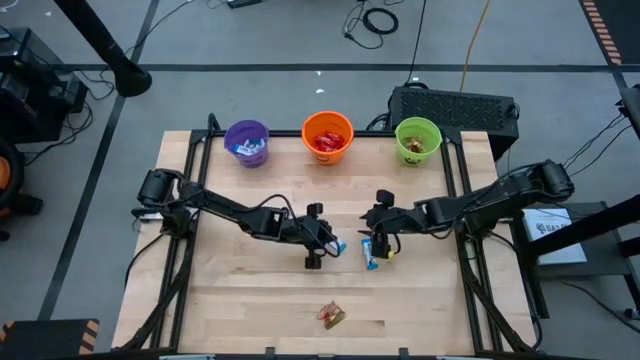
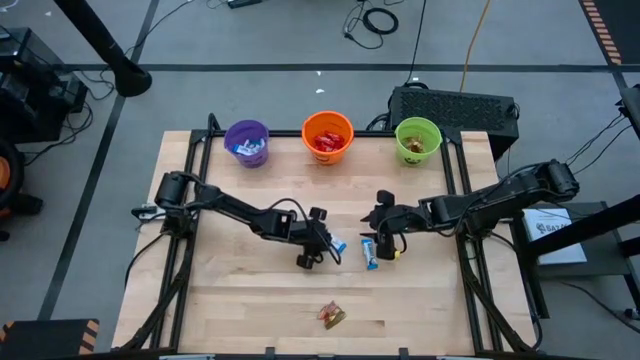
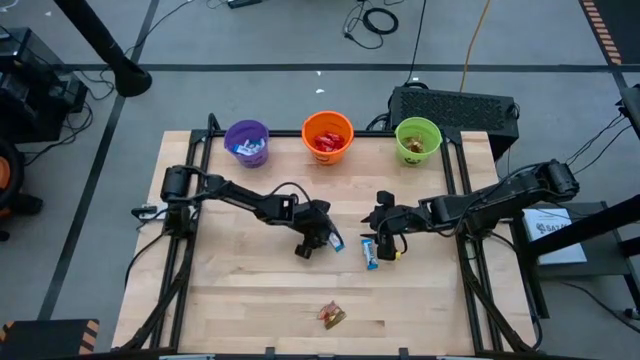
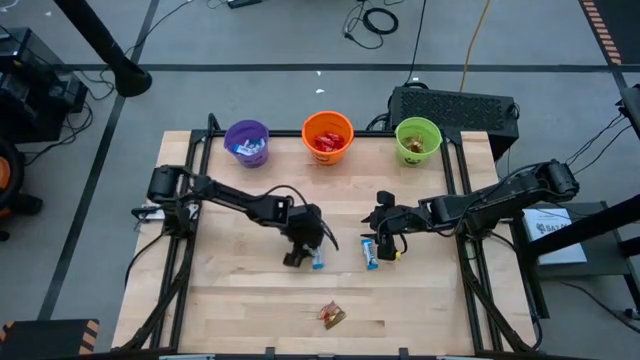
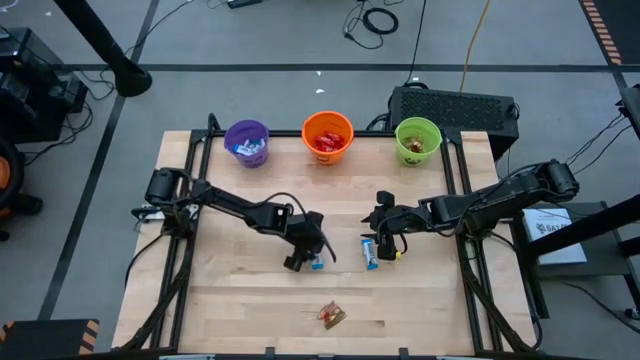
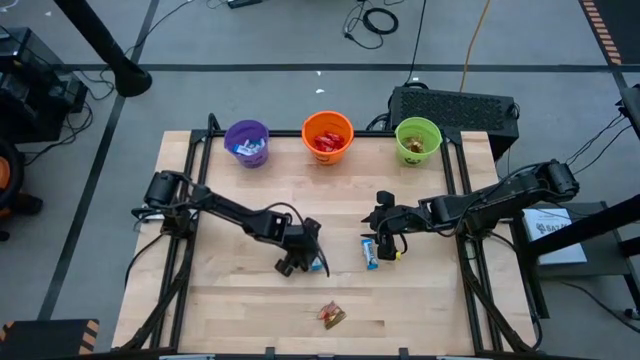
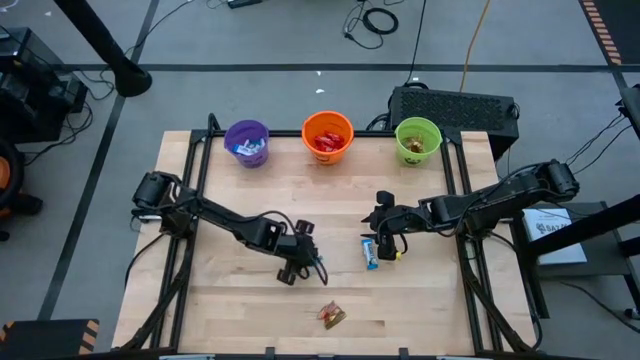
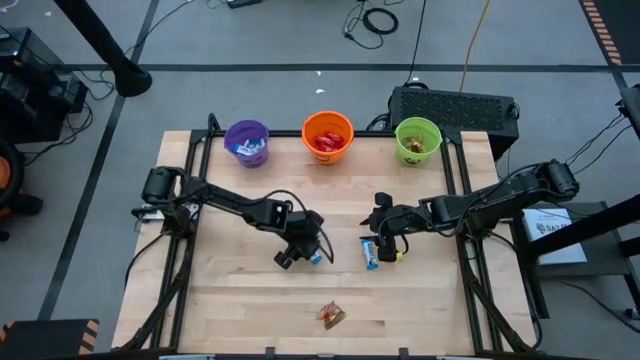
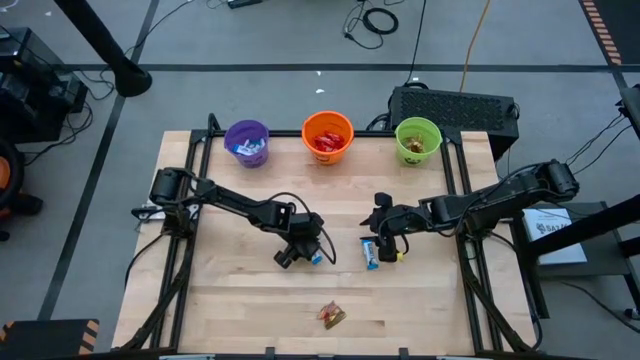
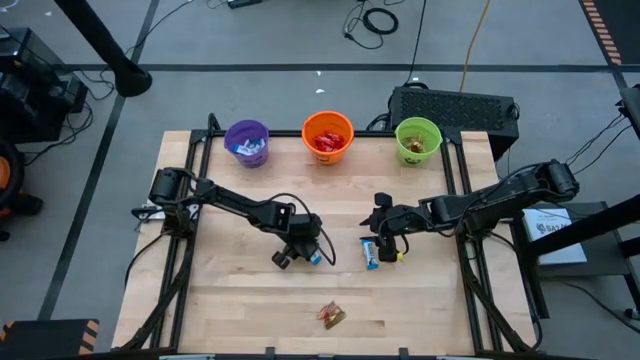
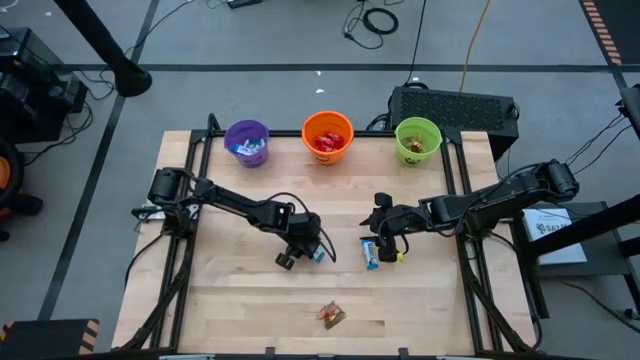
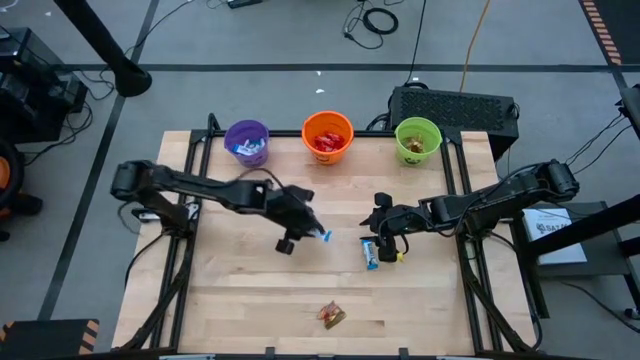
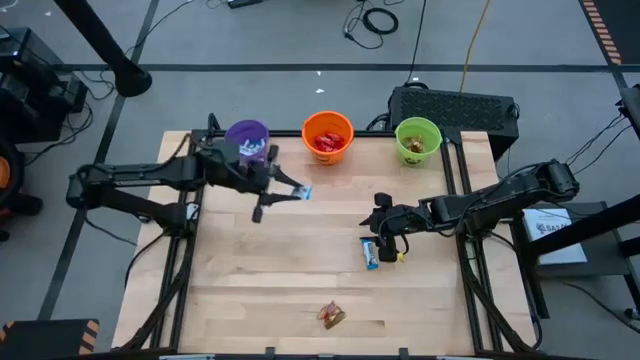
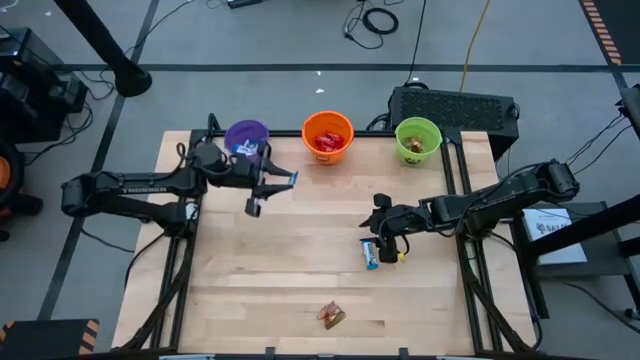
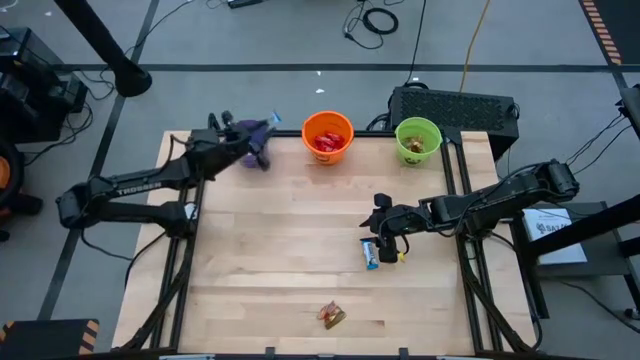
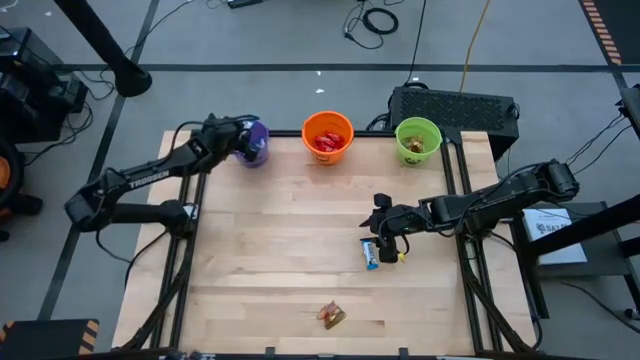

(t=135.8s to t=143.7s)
Task: Sort candy by brand, put in halloween buckets
Put the white chocolate into the purple bucket

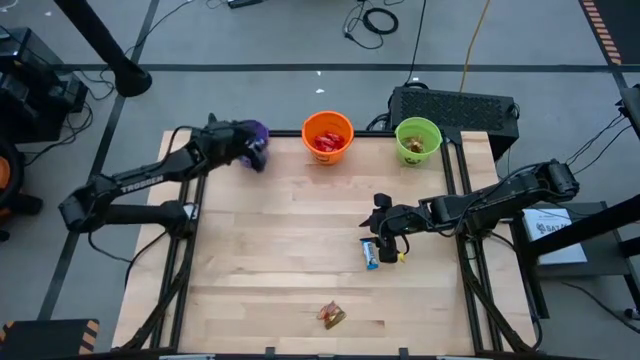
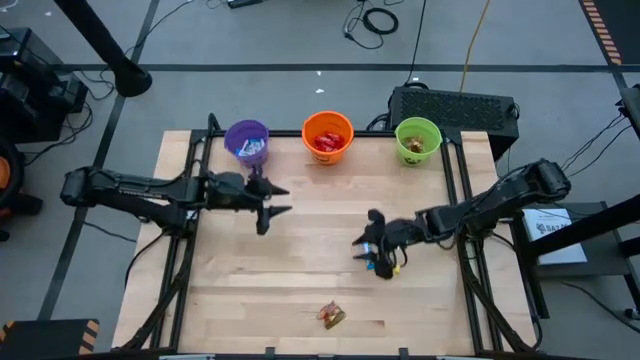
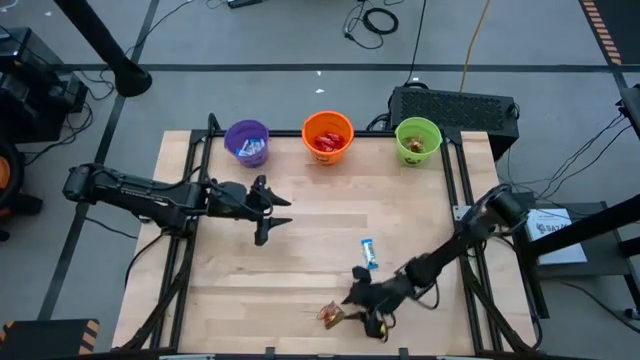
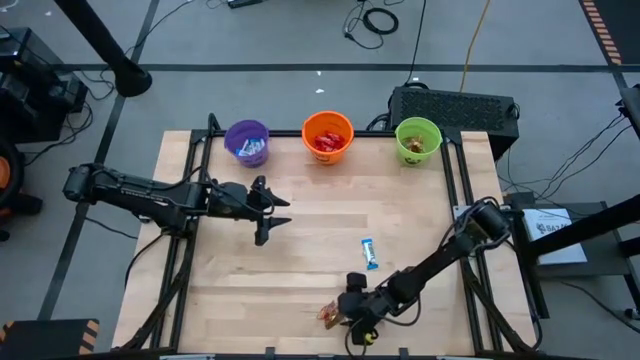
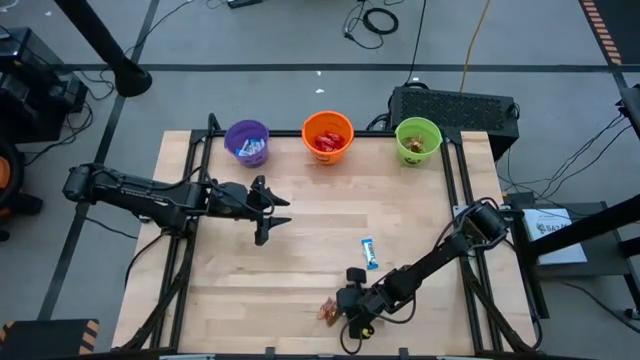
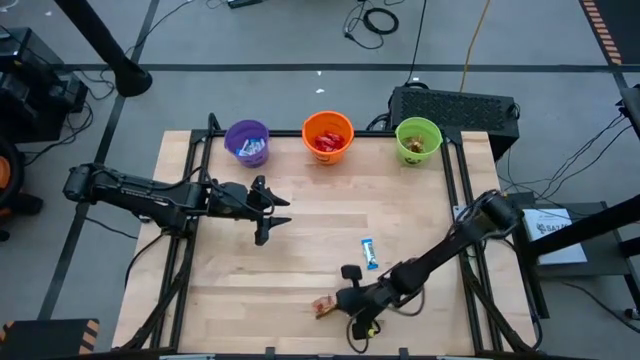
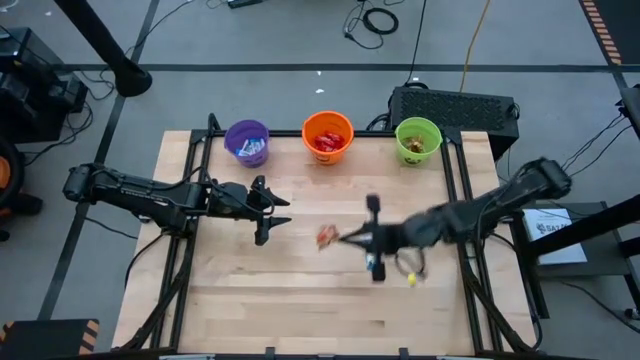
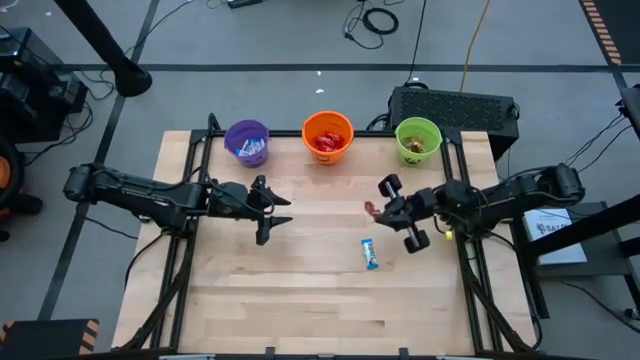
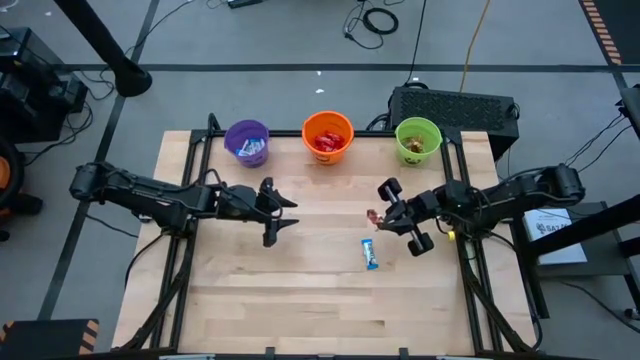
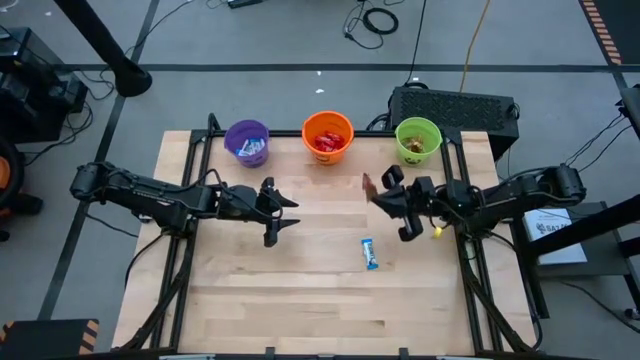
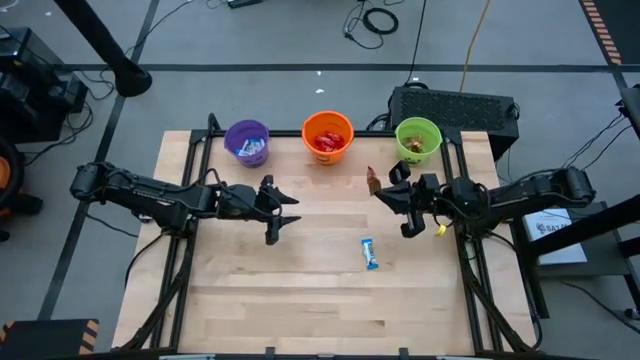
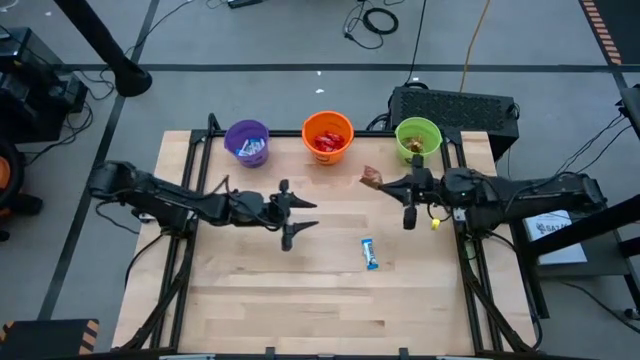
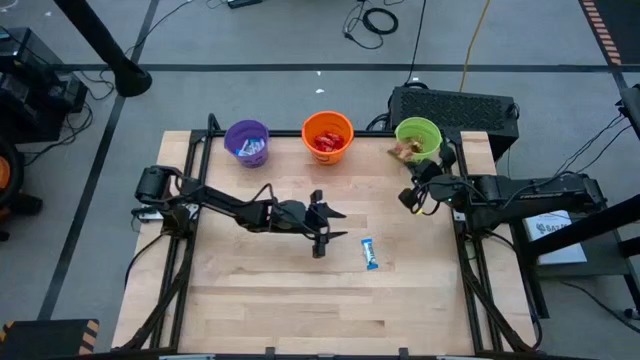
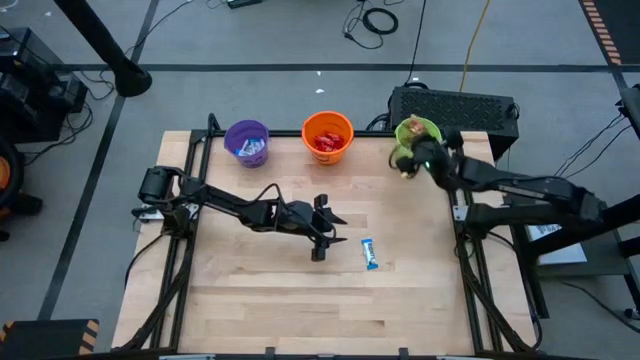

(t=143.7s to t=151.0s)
Put the brown gummy into the green bucket

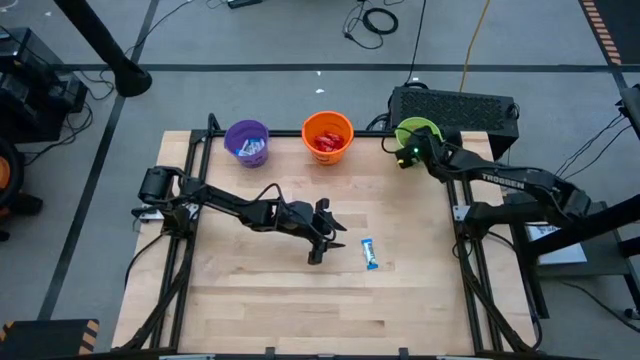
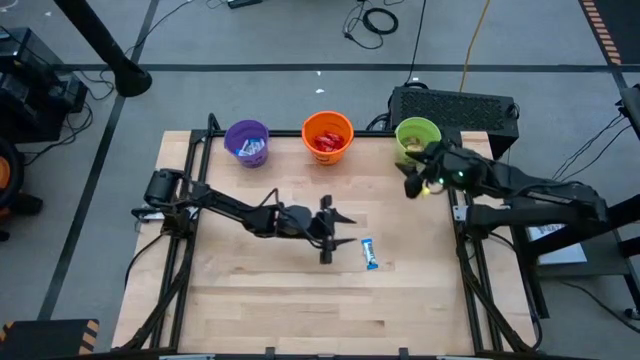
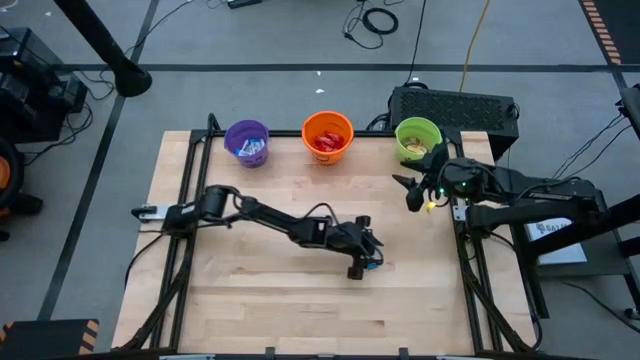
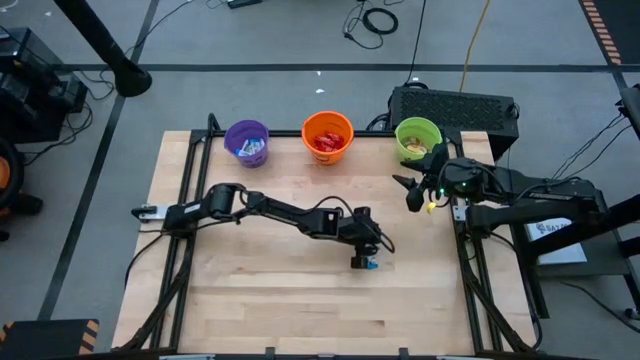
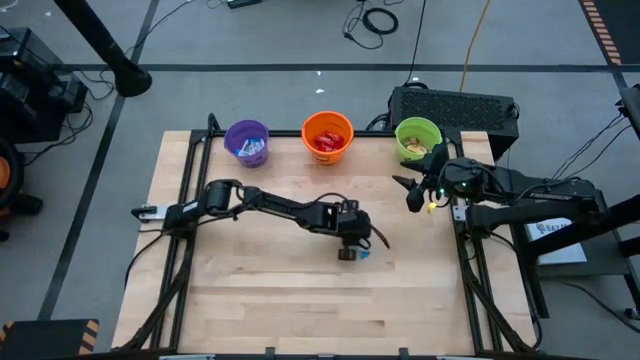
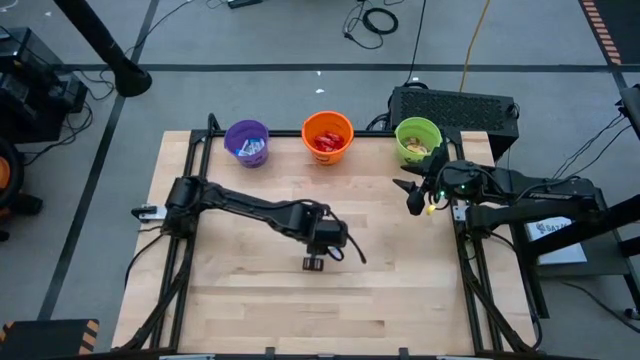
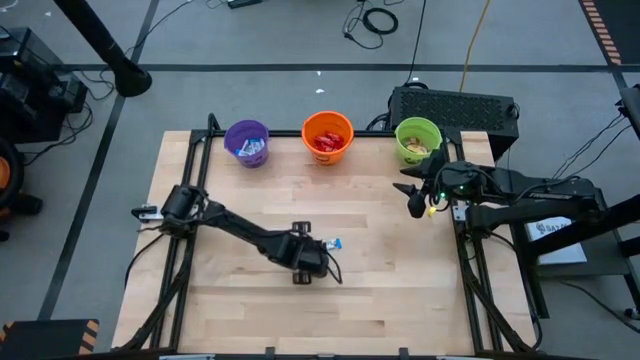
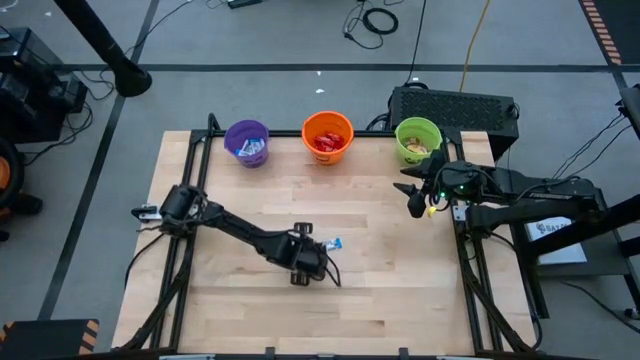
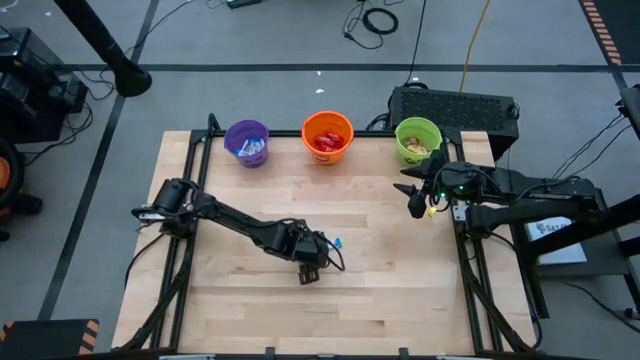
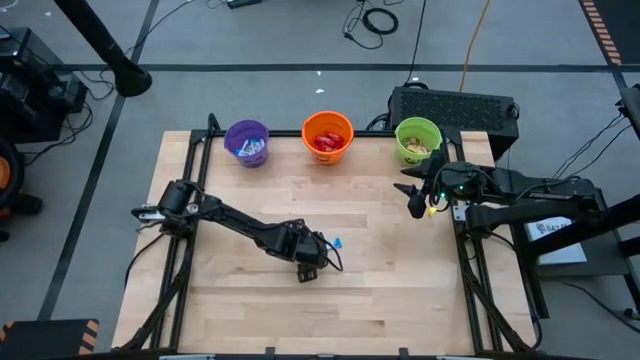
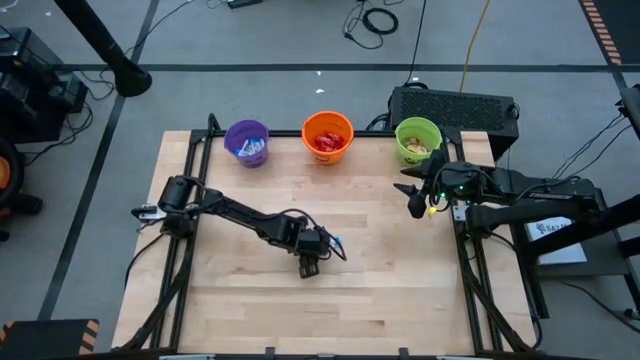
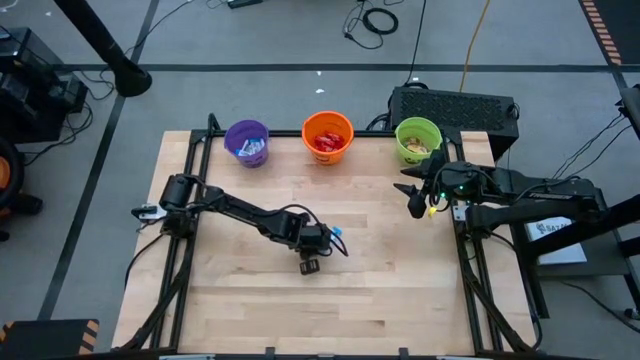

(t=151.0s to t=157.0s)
Put the white chocolate into the purple bucket
